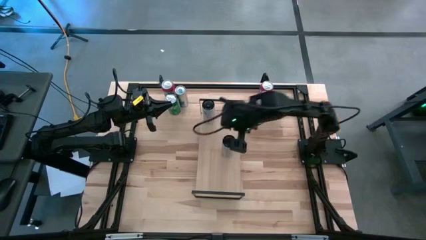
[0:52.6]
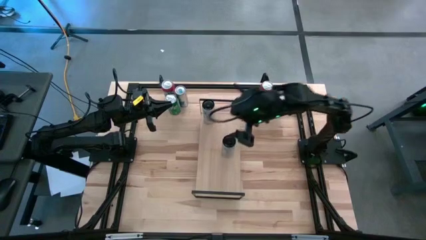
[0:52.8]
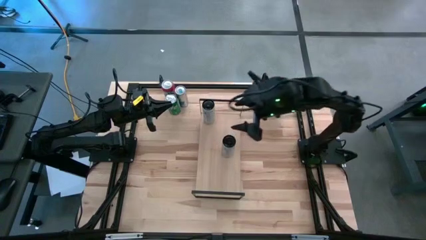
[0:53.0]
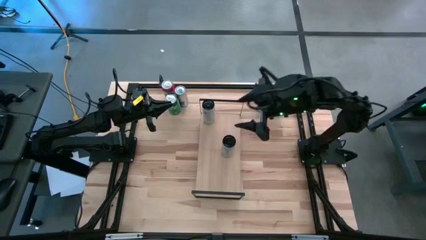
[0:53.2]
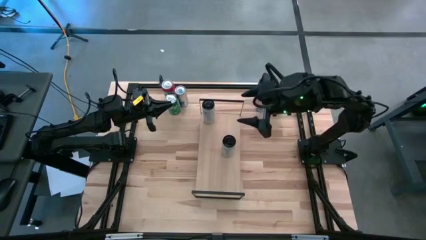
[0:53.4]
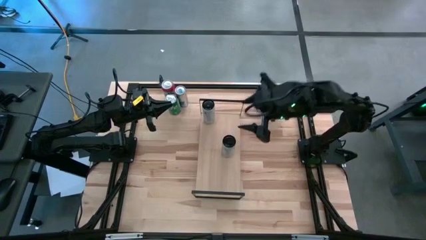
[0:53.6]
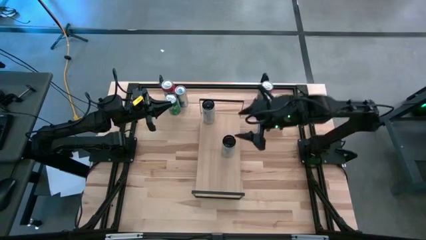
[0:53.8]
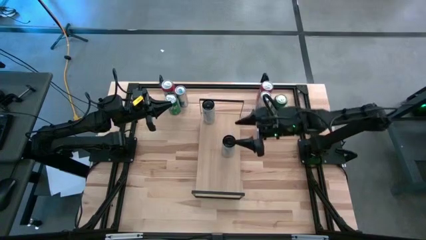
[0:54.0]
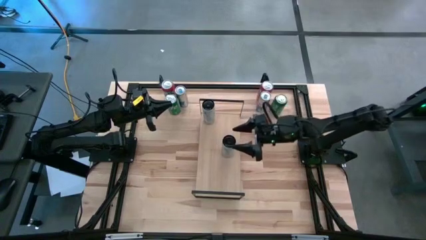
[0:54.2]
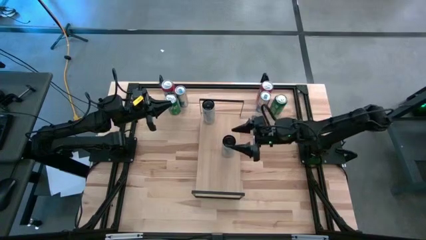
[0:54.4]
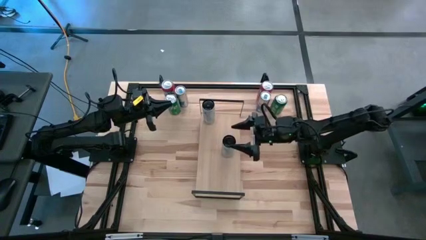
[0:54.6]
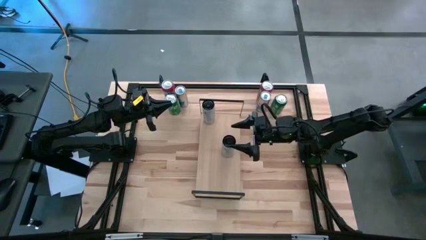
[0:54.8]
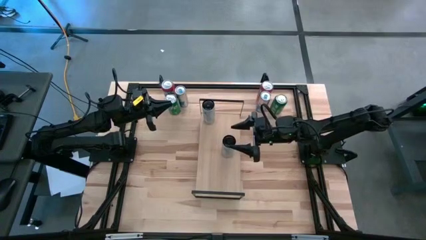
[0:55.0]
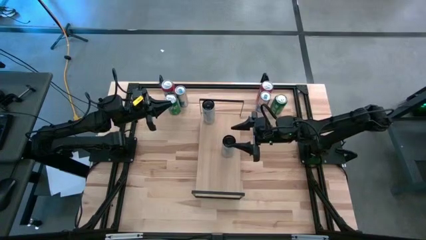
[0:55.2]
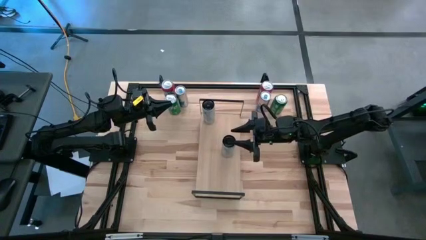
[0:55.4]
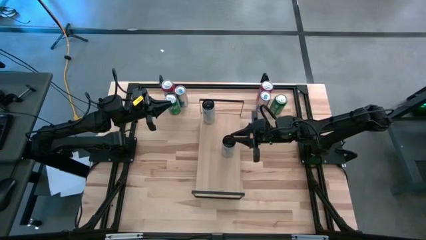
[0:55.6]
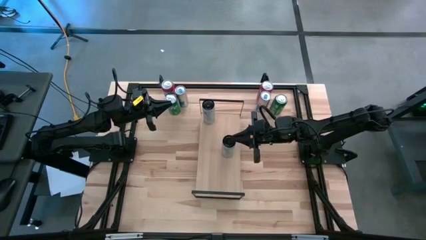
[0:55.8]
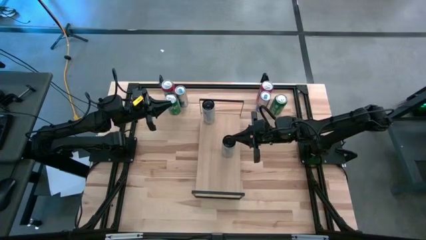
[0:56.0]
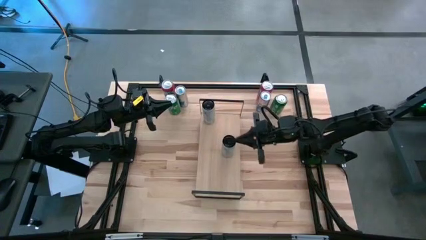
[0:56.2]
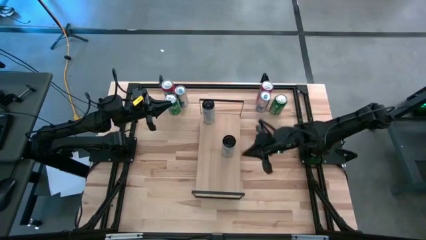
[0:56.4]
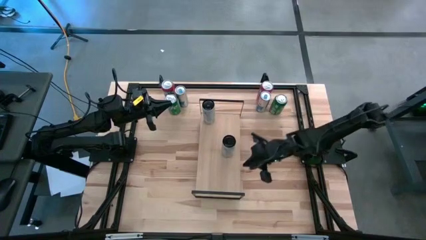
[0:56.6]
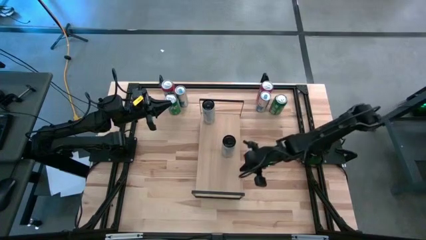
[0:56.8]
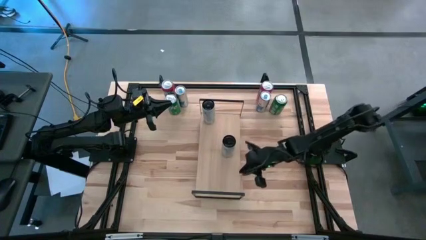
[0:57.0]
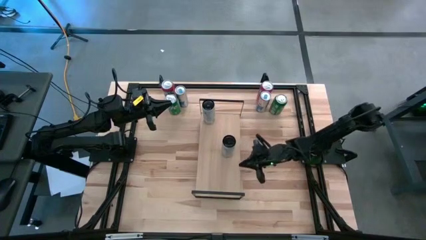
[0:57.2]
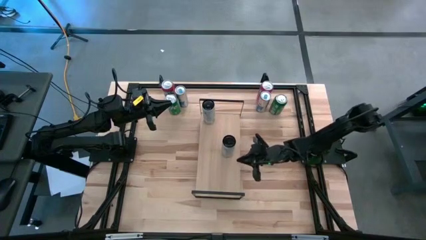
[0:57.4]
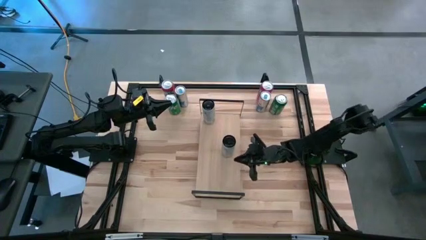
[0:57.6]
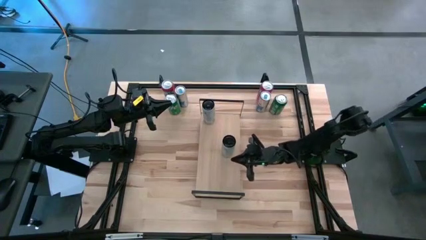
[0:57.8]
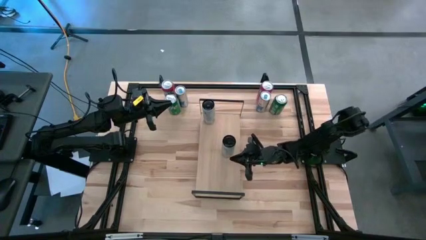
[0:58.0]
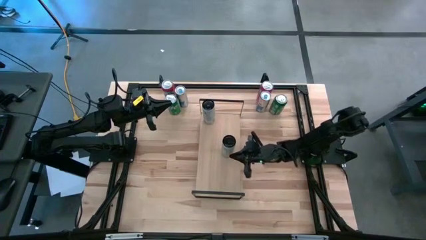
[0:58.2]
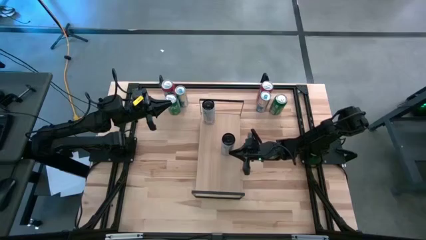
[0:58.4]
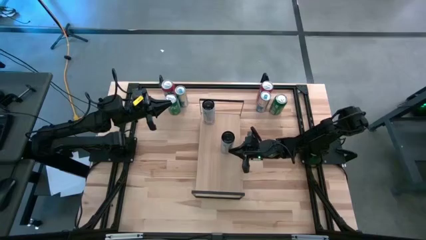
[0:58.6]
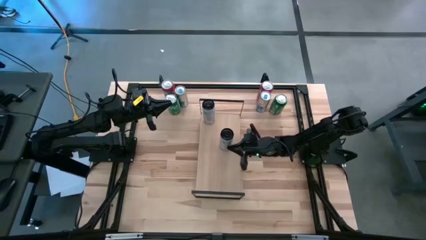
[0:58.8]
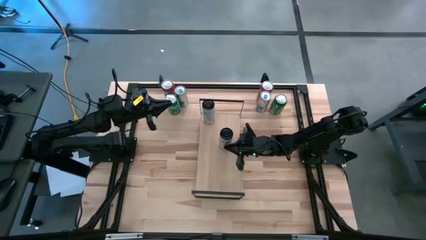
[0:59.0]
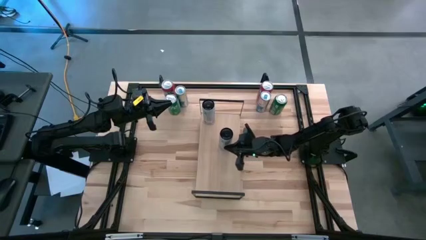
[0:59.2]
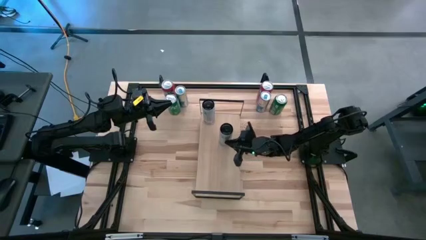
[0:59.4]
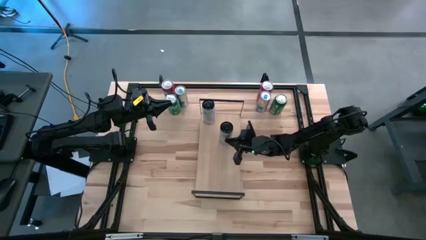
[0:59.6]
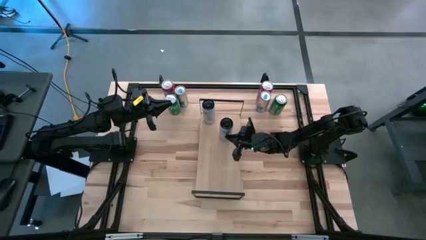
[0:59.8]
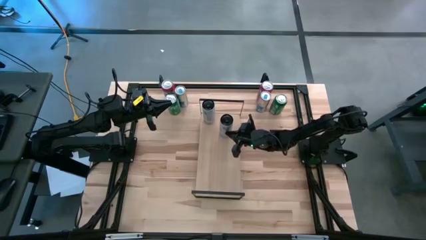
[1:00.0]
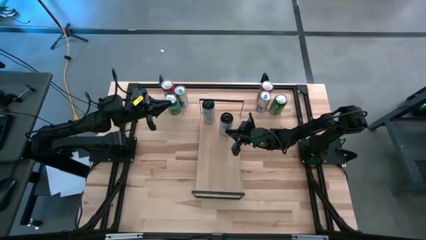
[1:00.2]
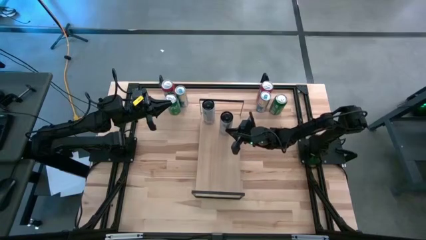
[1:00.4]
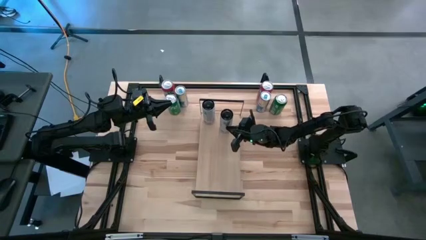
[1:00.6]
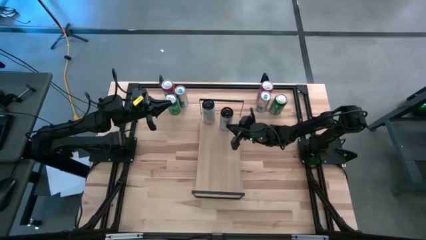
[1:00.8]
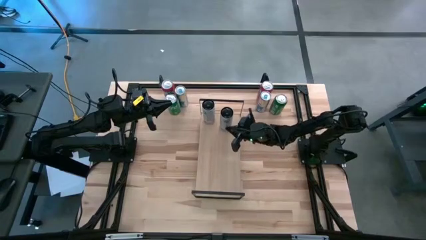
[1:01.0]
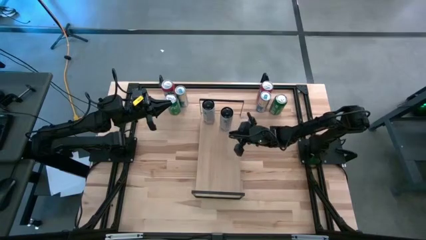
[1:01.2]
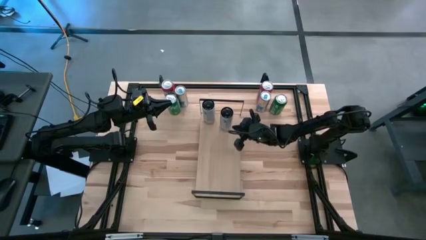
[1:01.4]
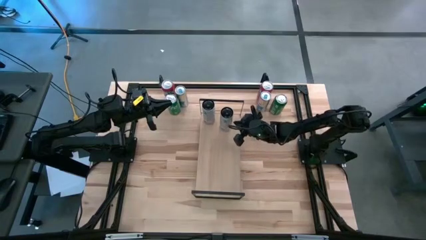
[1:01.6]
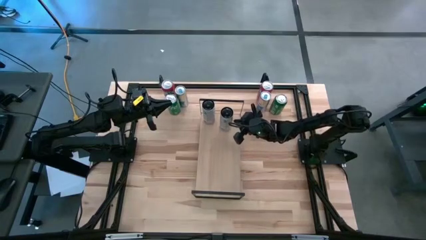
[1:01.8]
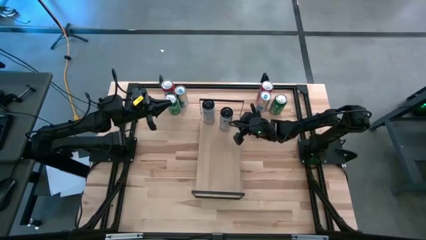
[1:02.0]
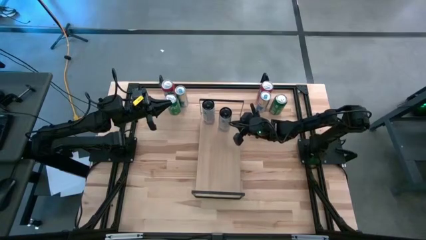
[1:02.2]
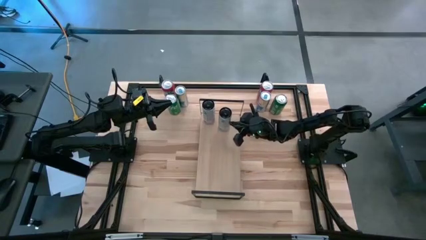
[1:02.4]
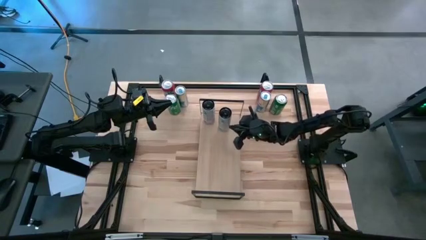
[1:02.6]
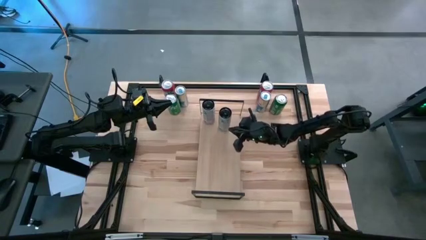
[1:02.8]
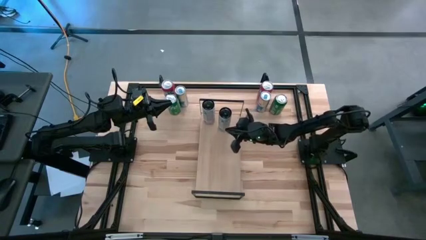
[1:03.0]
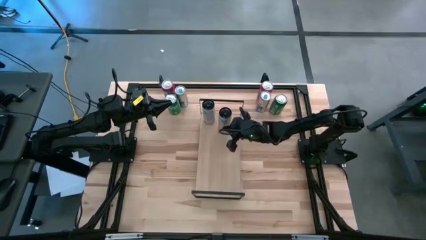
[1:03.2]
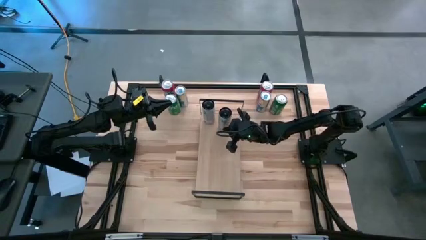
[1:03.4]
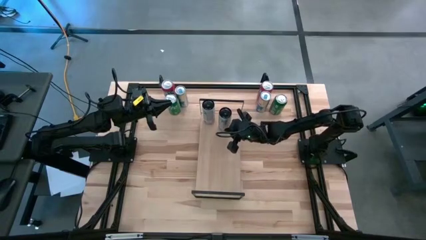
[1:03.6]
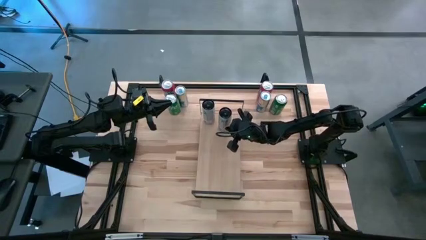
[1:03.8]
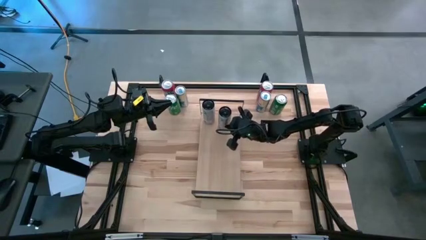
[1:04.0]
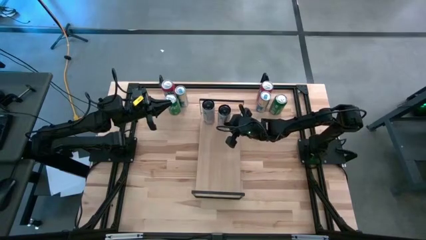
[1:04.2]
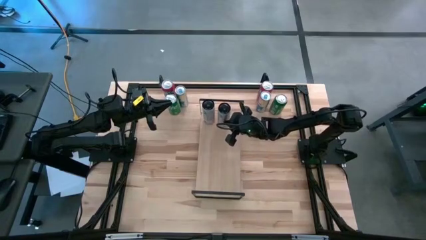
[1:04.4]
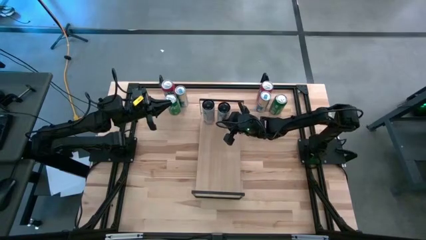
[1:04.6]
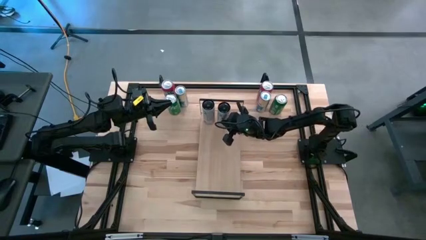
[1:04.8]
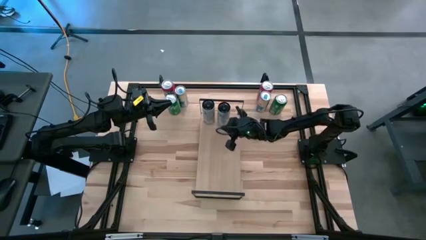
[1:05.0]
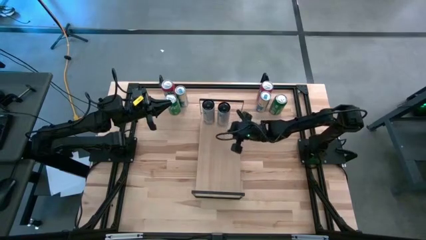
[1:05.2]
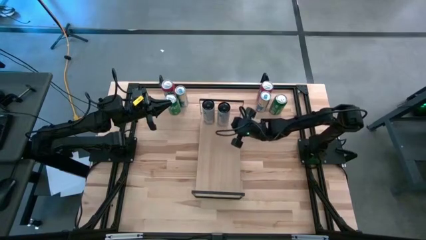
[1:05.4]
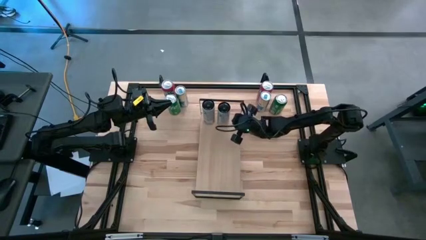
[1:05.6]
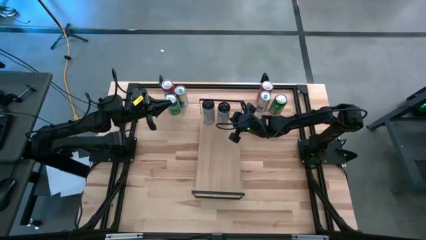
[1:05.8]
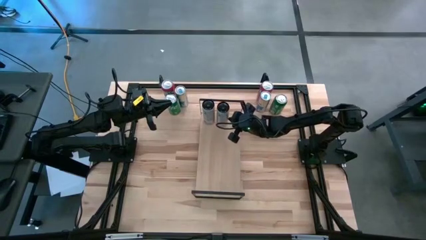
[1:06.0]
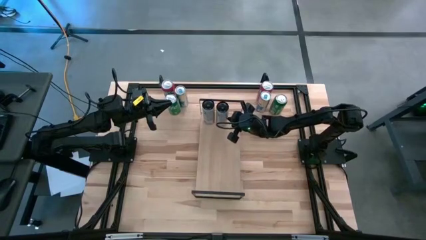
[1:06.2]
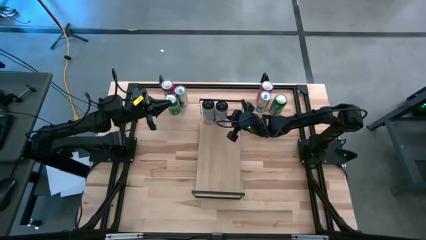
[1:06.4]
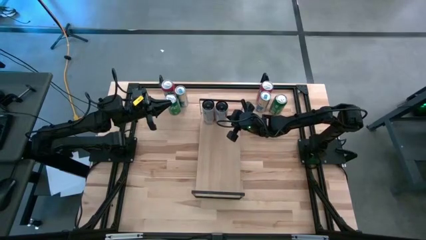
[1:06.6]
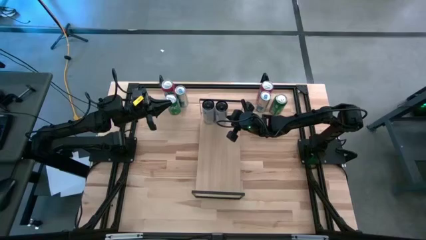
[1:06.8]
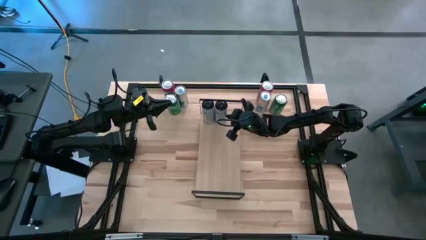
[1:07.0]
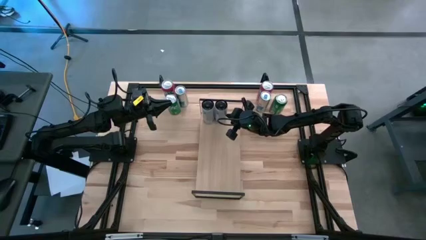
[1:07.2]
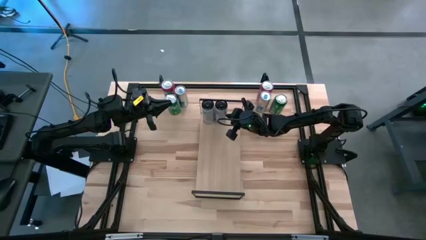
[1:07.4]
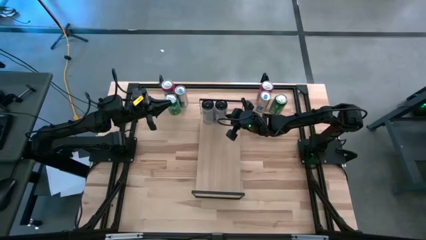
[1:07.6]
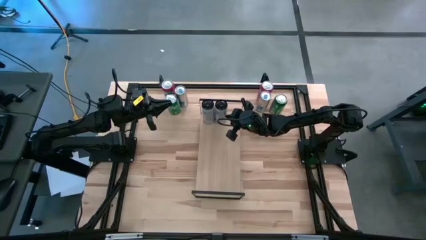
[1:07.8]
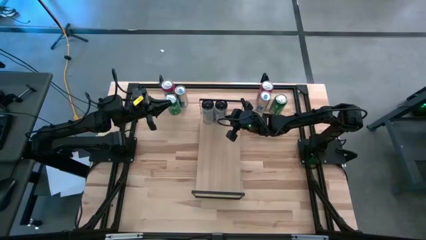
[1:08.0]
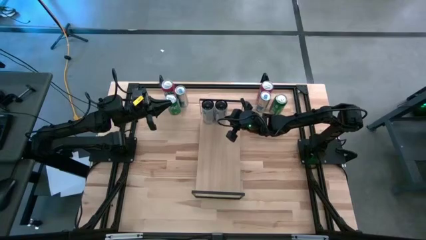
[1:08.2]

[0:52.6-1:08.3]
Task: Place canned beverage on shelf
Put the left white-pink soda can, aligned with the other white-pink soda can on the shelf
